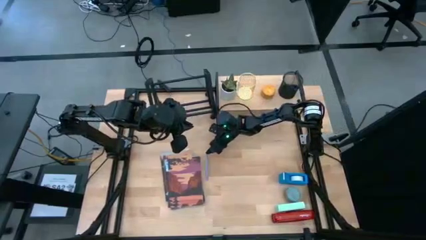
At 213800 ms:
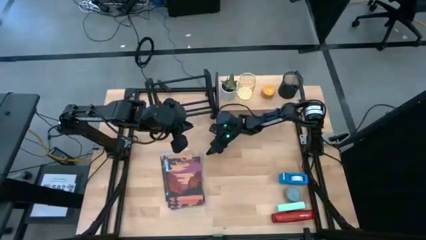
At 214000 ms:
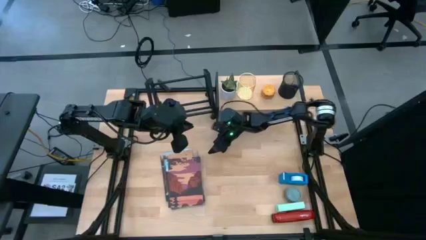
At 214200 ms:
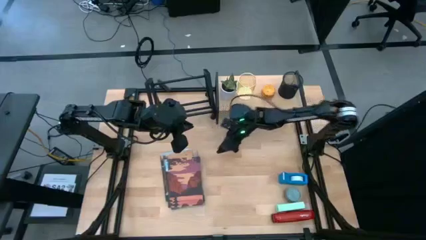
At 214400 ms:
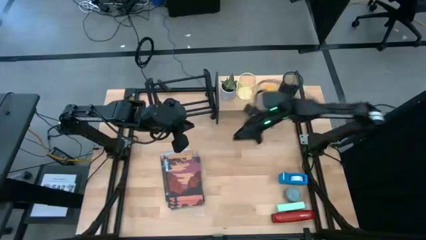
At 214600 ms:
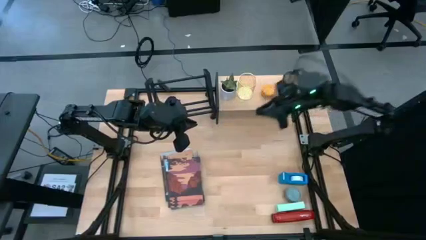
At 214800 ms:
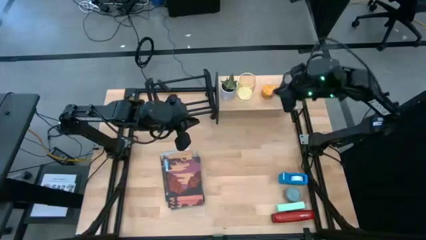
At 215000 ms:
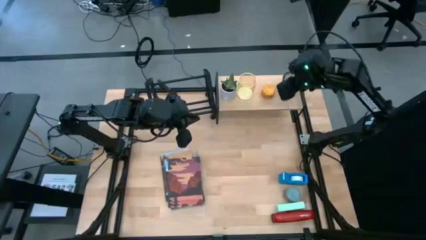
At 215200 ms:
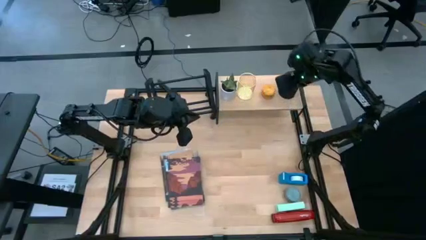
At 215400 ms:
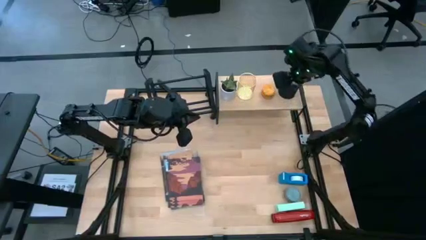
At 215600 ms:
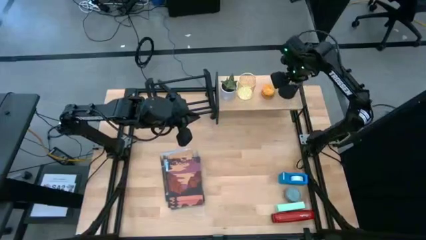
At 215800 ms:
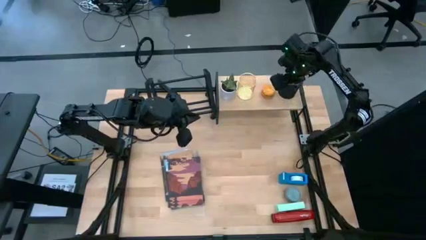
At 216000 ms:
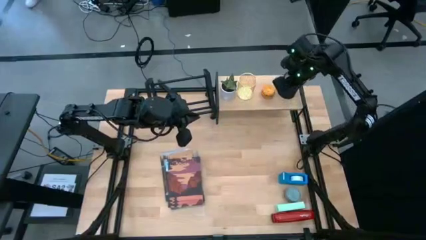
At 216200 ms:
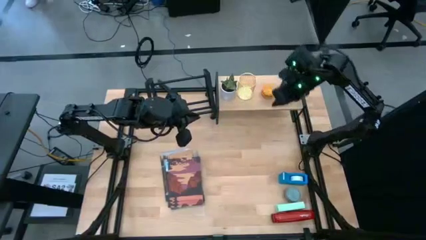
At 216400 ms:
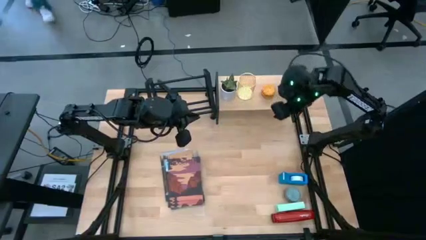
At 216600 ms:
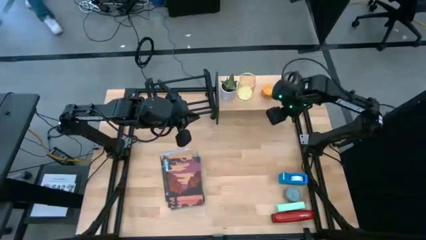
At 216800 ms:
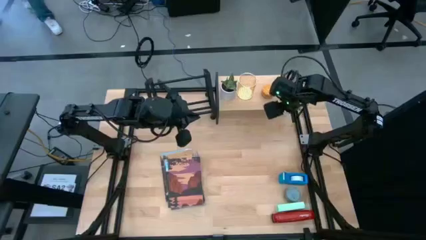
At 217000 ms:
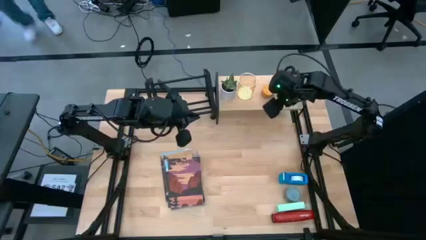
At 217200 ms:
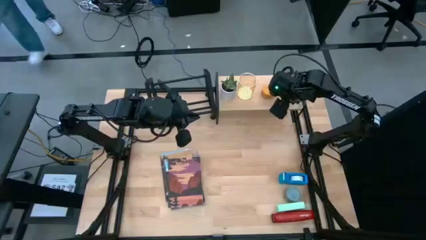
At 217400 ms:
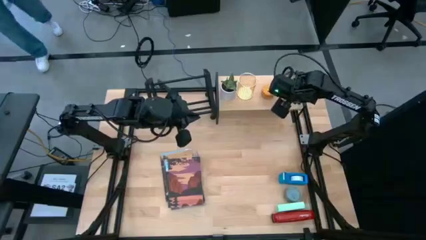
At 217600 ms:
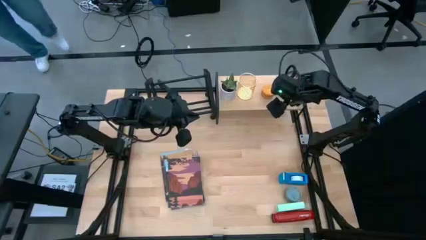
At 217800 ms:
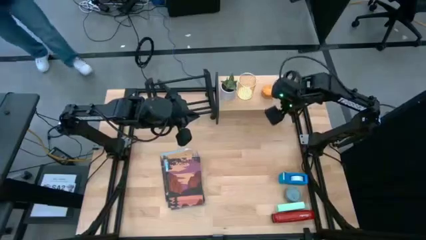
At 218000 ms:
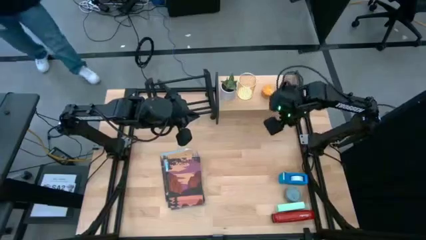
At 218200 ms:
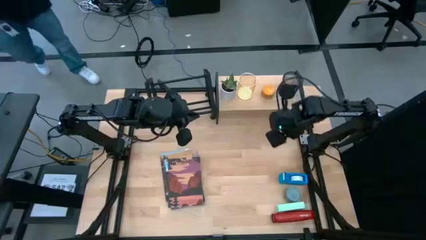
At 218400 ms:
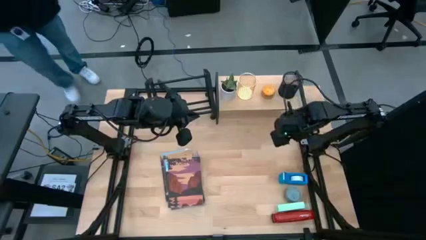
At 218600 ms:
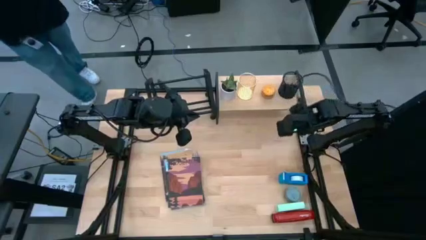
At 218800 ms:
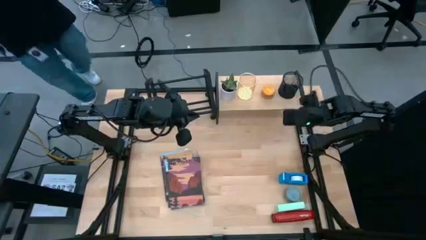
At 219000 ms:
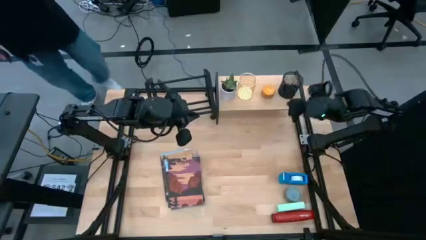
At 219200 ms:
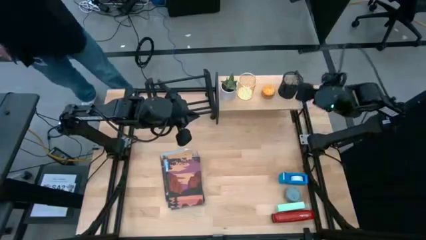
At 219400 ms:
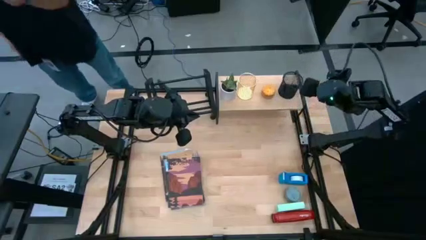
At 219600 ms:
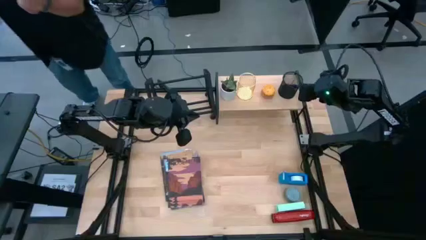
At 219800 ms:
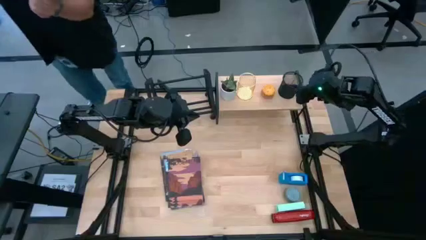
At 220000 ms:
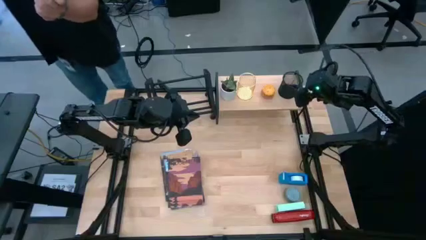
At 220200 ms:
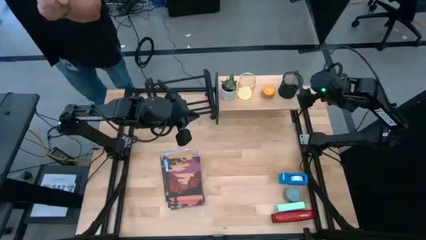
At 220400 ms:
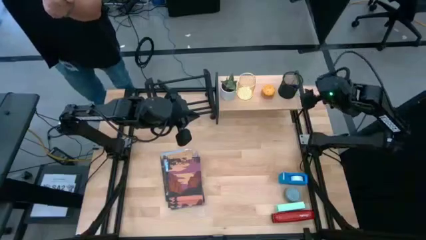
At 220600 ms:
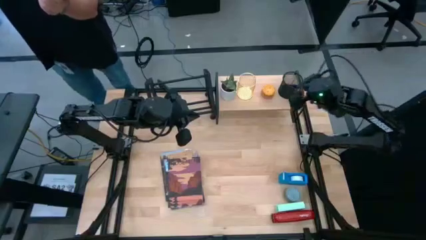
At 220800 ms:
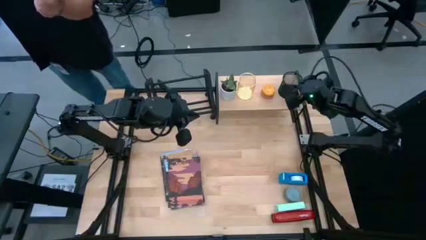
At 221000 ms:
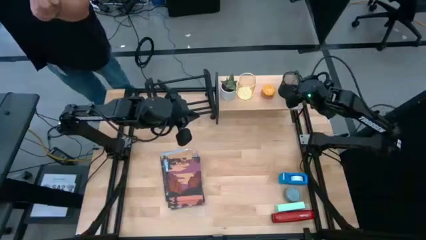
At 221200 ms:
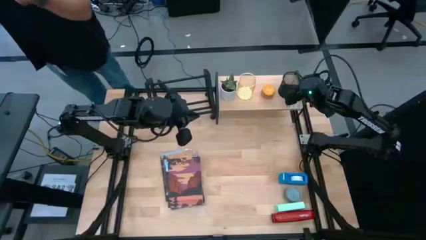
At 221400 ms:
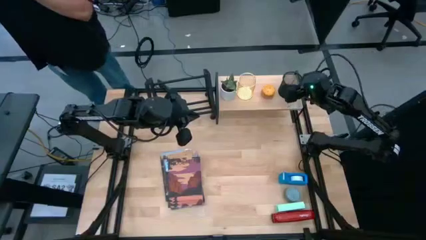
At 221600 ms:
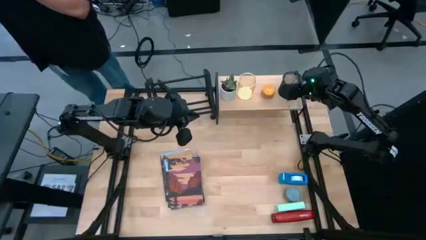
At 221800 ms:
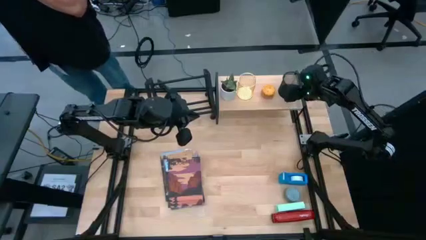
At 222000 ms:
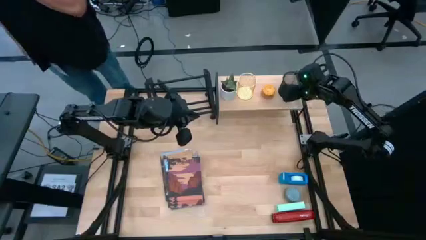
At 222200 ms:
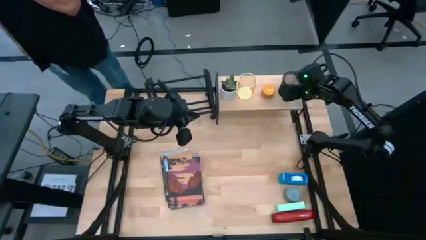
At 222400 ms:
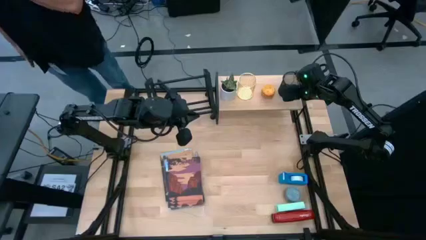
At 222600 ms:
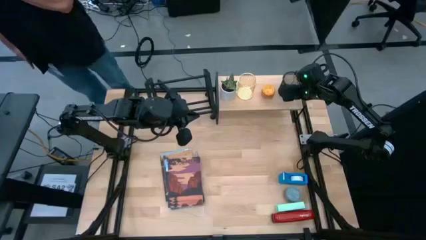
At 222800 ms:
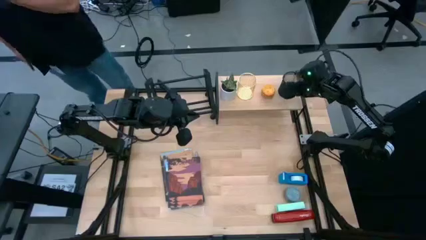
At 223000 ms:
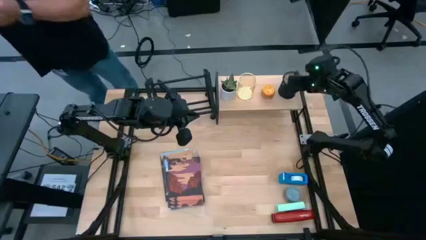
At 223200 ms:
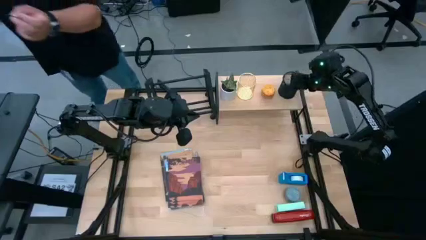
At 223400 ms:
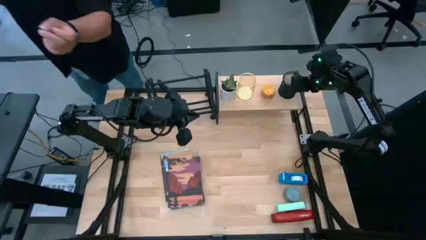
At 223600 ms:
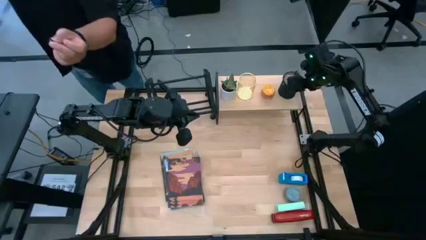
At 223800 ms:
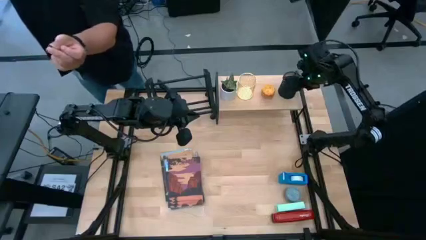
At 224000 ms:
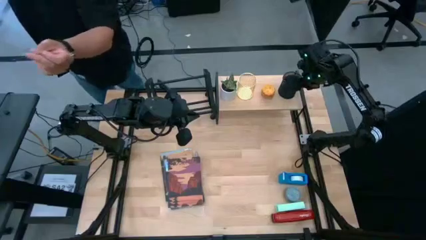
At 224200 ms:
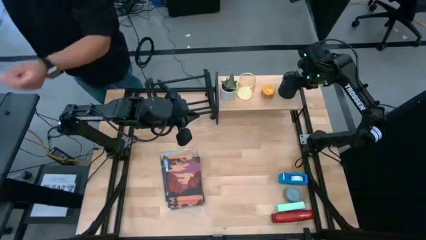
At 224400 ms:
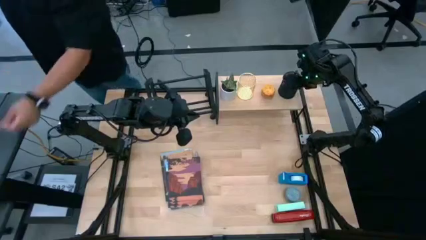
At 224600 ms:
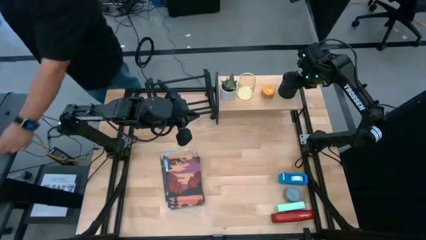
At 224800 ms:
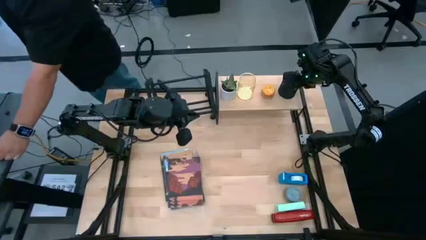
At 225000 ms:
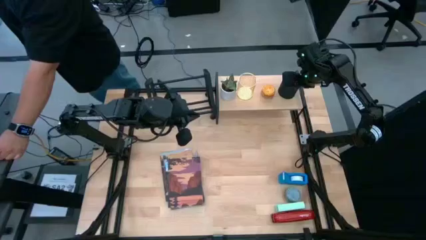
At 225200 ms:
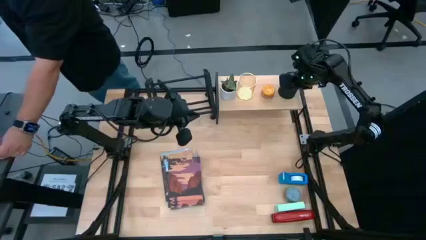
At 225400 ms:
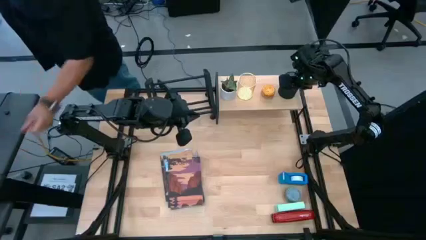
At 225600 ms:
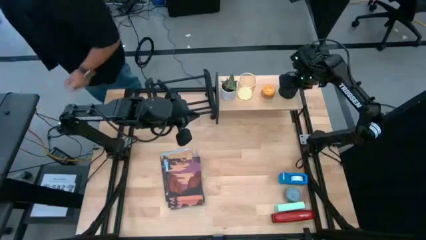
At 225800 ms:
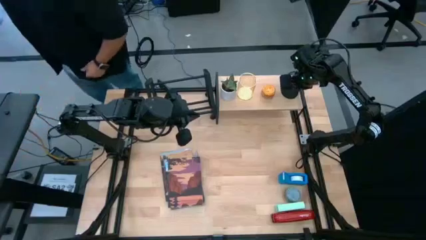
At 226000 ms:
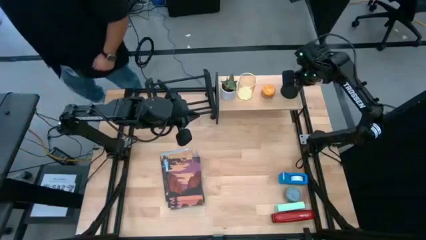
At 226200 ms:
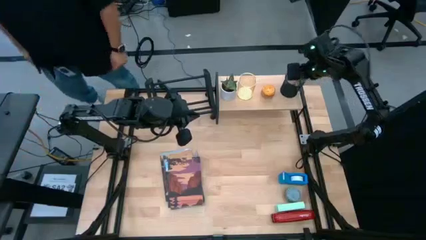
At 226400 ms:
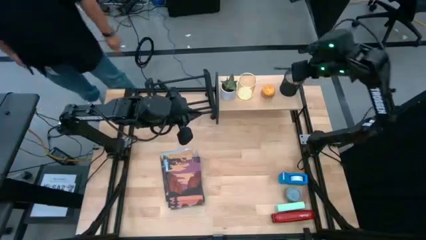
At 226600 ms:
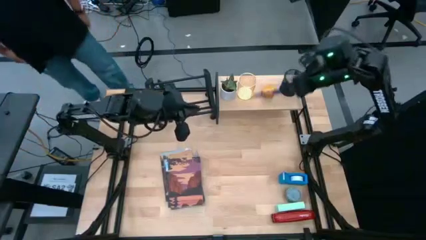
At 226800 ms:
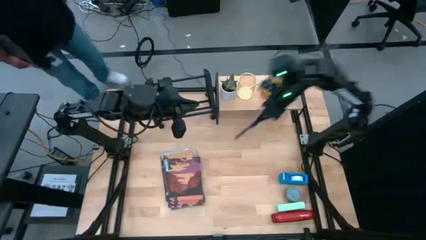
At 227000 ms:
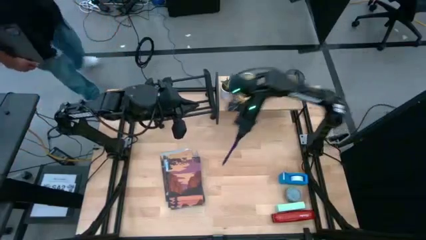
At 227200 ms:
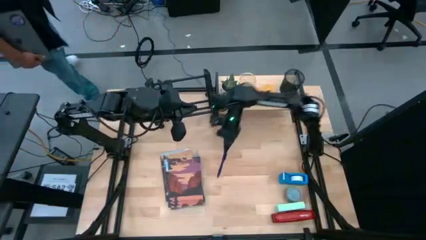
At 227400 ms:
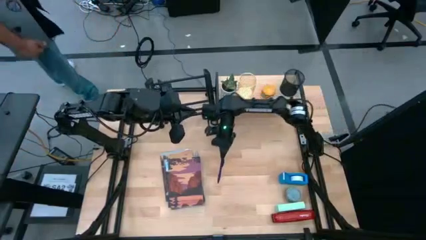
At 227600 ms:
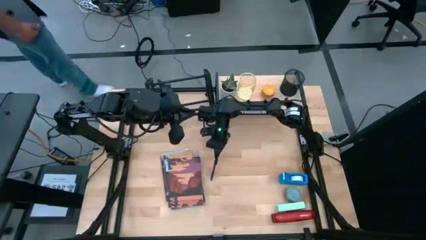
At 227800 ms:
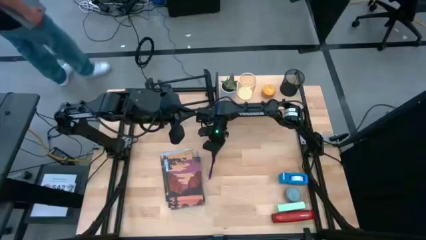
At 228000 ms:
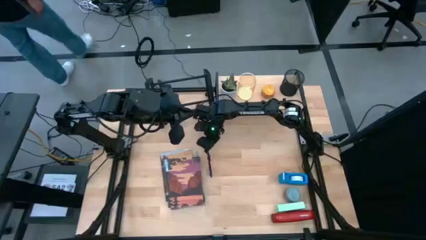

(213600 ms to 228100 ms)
Task: Stock shelves
Remove the blue pen from the black pen organizer on the shelf

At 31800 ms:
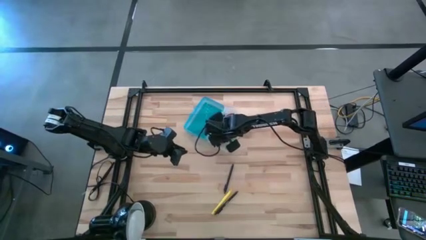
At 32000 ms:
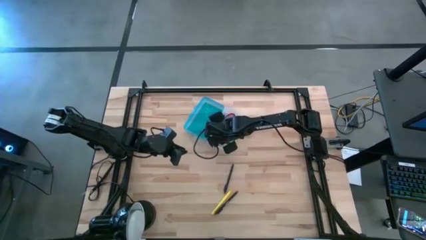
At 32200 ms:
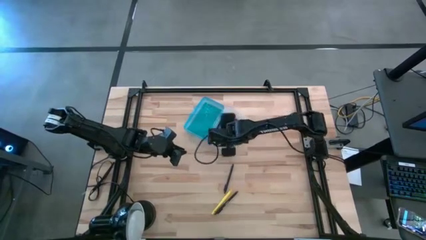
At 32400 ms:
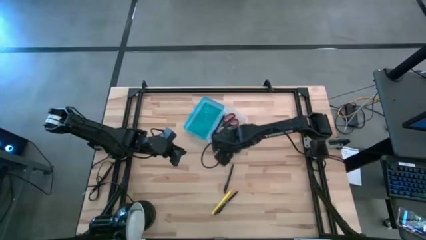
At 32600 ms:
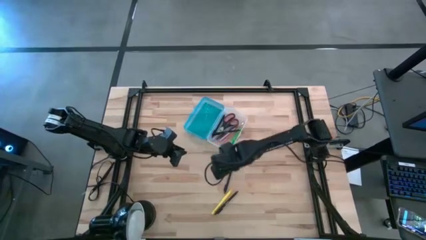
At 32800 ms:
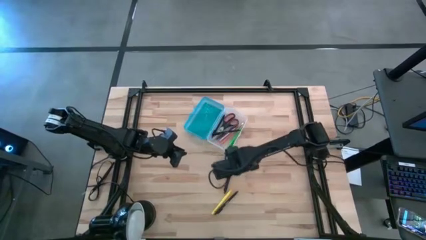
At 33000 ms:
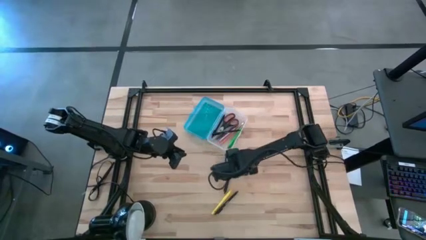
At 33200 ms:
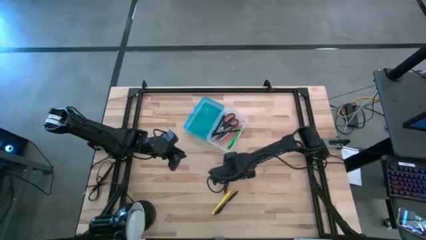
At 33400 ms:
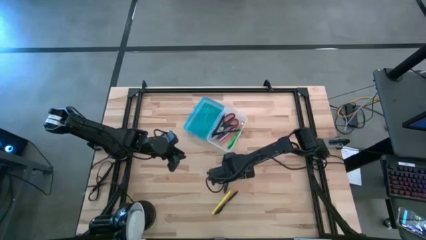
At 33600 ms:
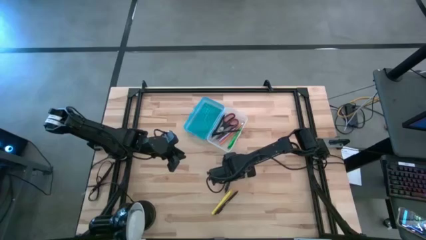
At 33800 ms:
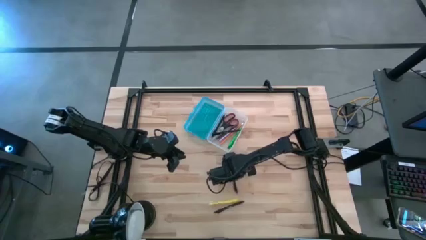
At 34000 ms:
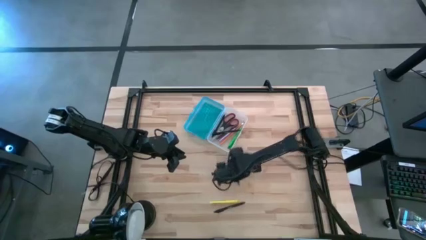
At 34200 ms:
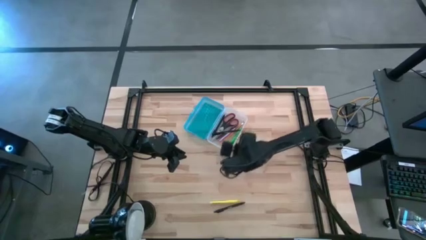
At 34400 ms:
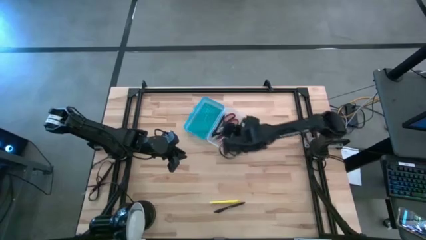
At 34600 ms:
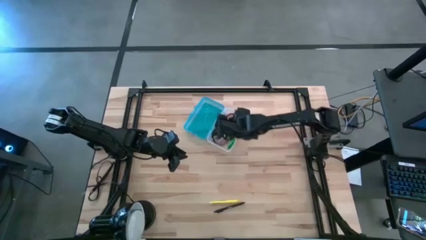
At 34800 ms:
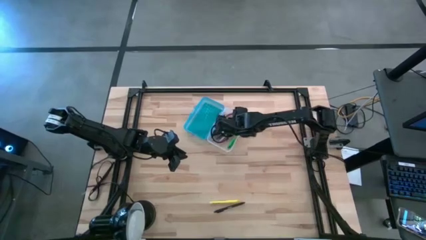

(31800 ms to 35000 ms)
Task: Pick & place school supplies into a supply box
Put the black pen into the blue supply box
